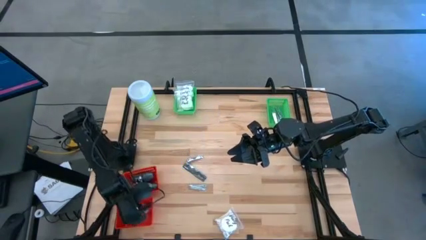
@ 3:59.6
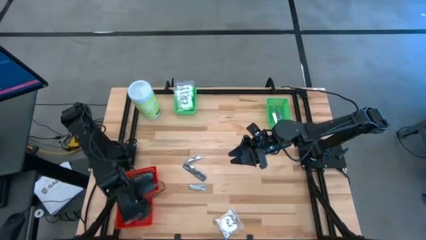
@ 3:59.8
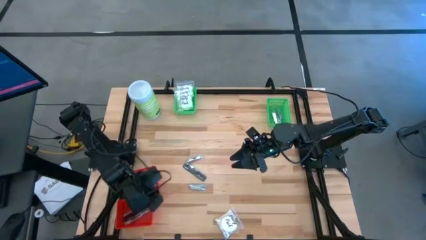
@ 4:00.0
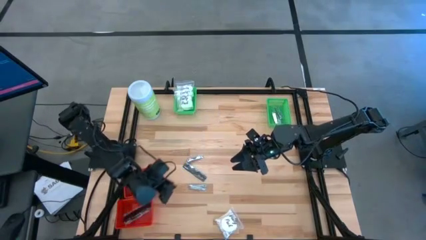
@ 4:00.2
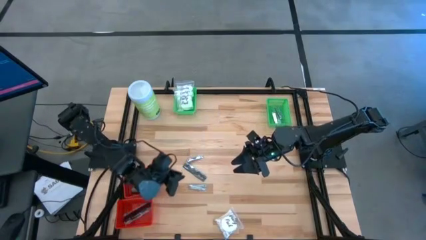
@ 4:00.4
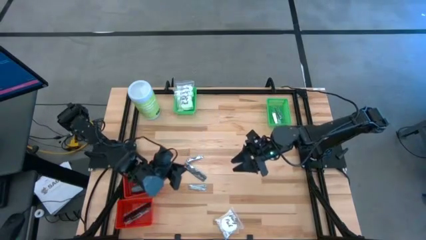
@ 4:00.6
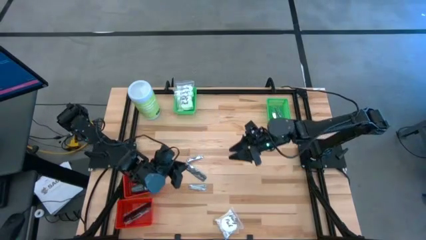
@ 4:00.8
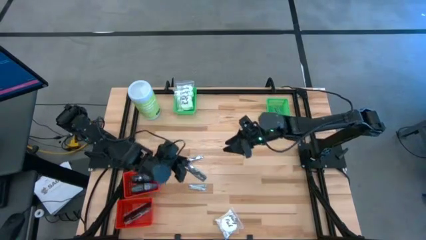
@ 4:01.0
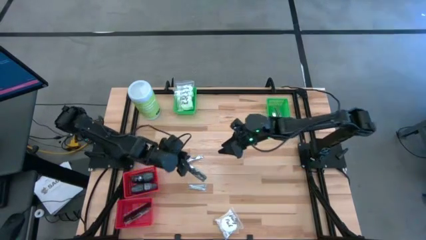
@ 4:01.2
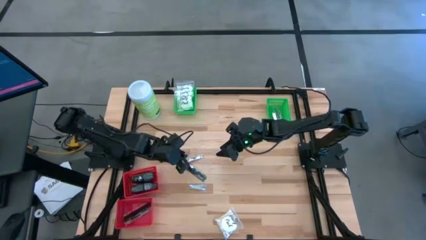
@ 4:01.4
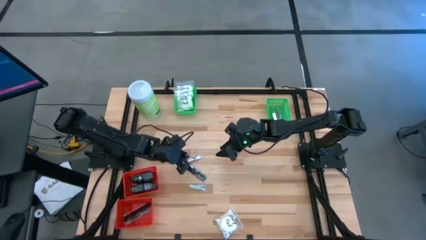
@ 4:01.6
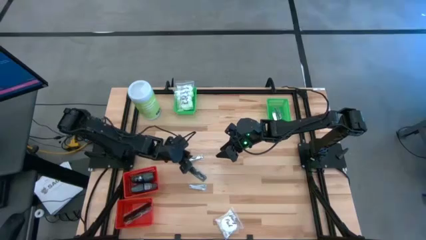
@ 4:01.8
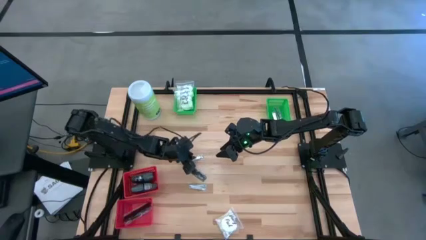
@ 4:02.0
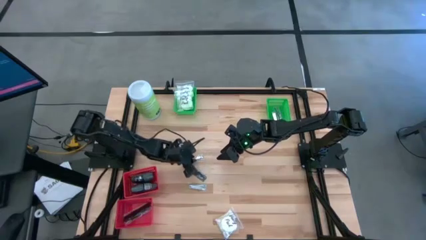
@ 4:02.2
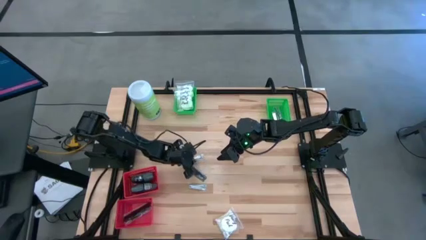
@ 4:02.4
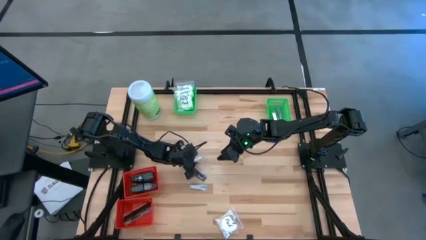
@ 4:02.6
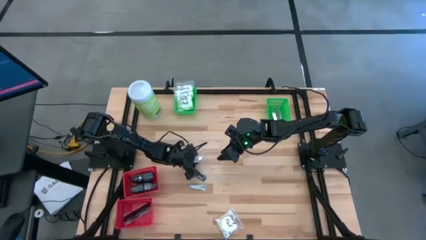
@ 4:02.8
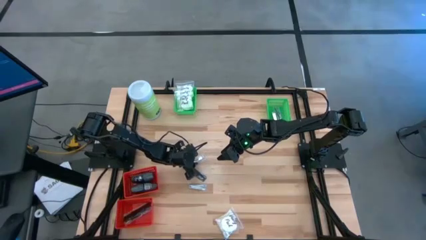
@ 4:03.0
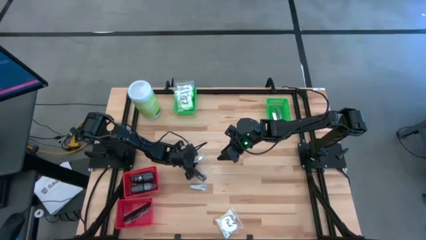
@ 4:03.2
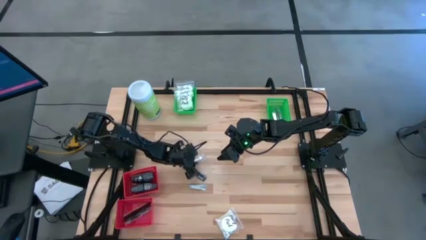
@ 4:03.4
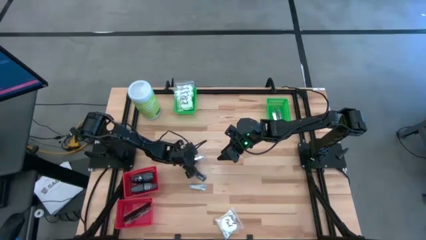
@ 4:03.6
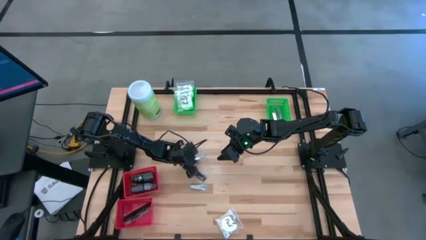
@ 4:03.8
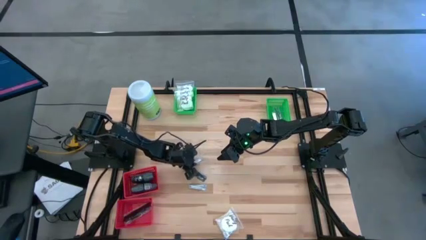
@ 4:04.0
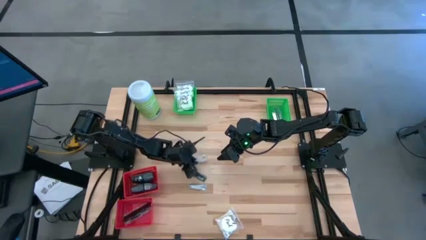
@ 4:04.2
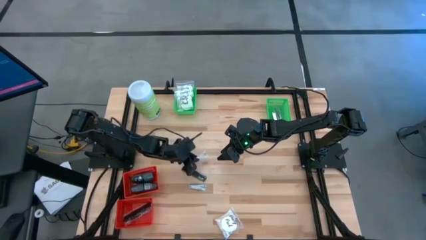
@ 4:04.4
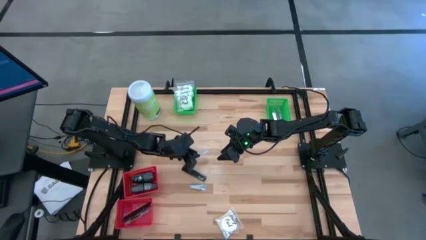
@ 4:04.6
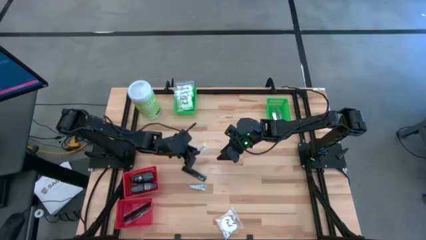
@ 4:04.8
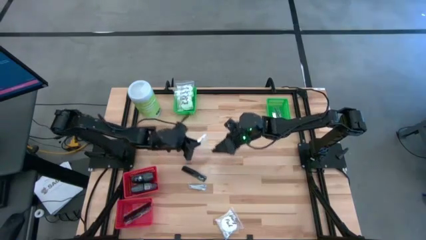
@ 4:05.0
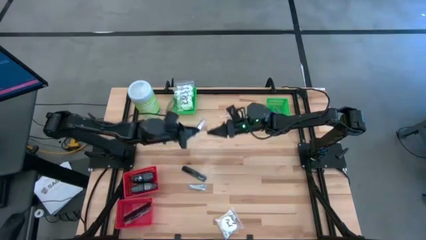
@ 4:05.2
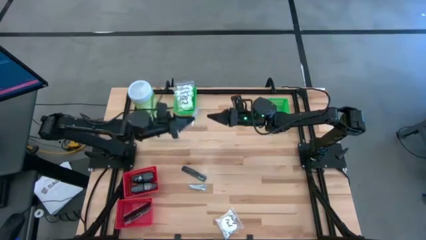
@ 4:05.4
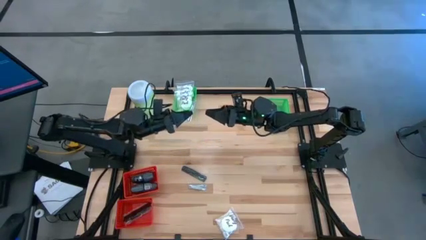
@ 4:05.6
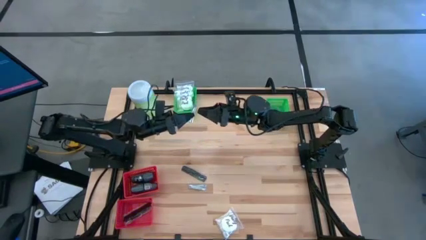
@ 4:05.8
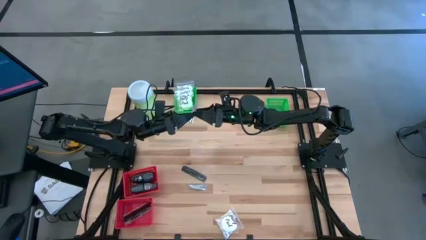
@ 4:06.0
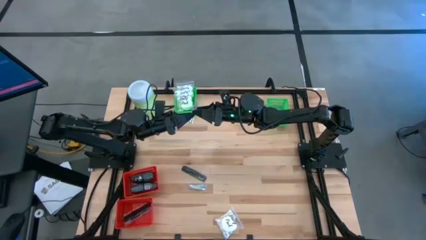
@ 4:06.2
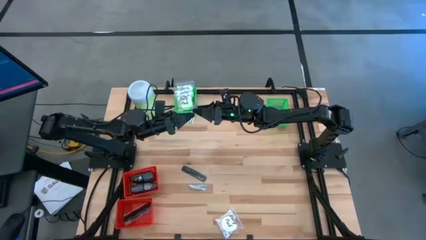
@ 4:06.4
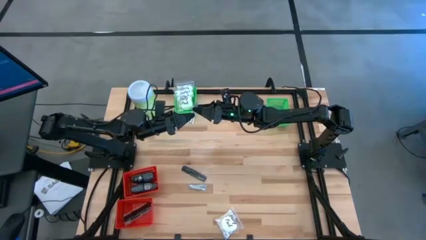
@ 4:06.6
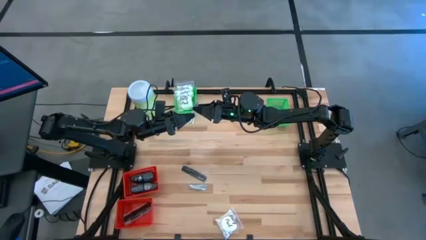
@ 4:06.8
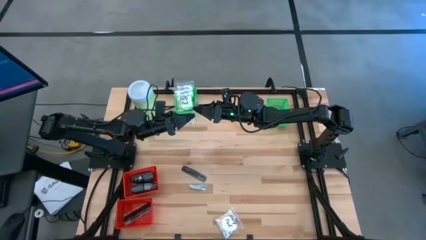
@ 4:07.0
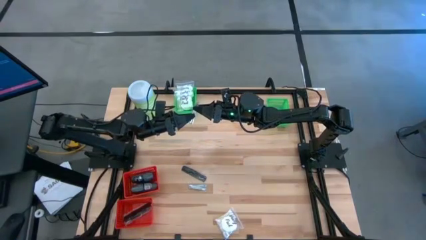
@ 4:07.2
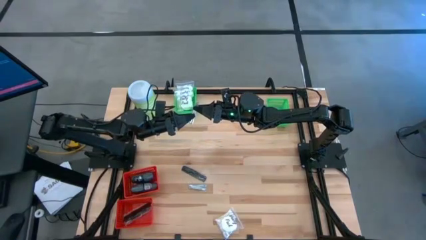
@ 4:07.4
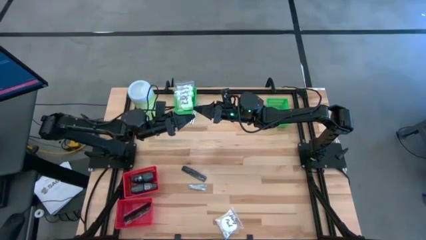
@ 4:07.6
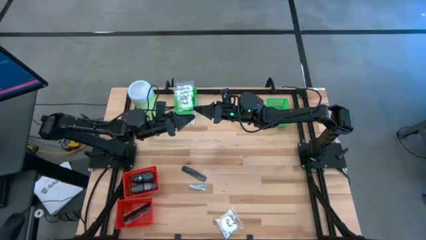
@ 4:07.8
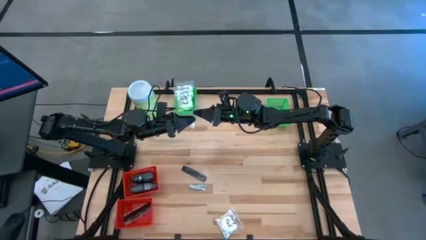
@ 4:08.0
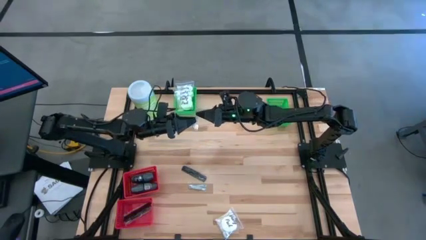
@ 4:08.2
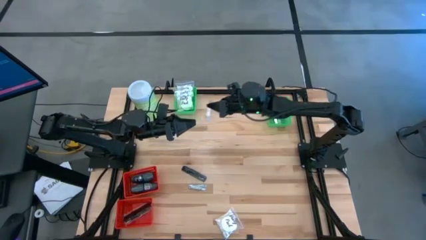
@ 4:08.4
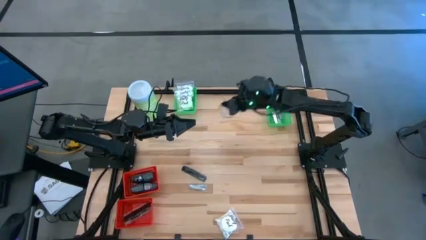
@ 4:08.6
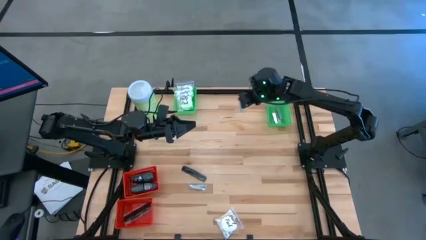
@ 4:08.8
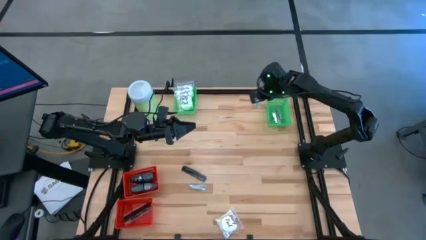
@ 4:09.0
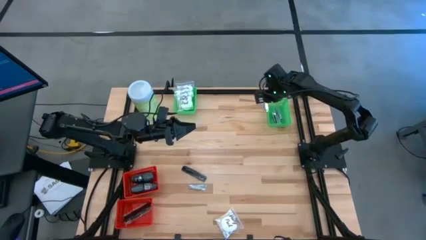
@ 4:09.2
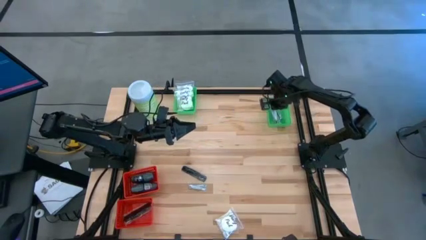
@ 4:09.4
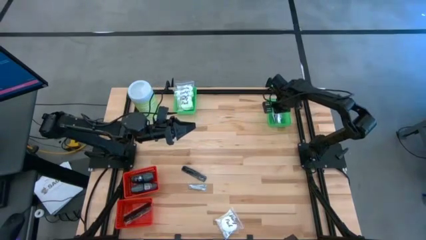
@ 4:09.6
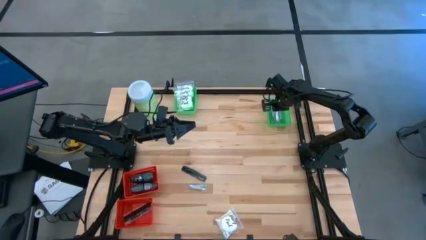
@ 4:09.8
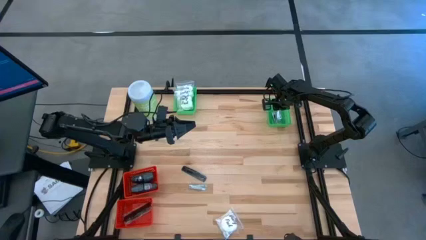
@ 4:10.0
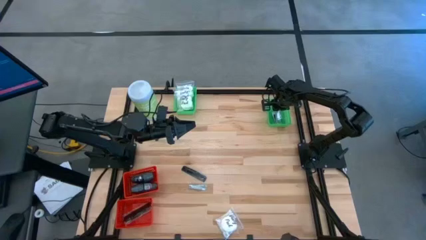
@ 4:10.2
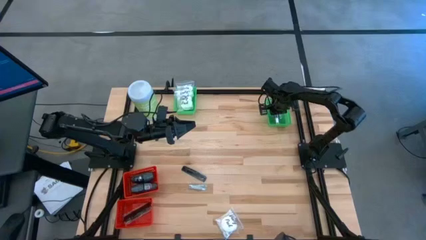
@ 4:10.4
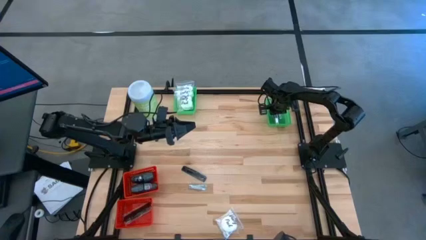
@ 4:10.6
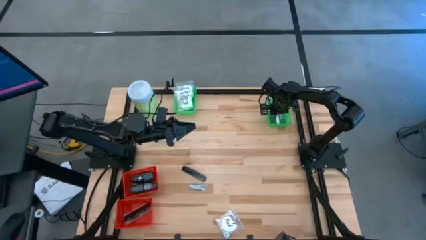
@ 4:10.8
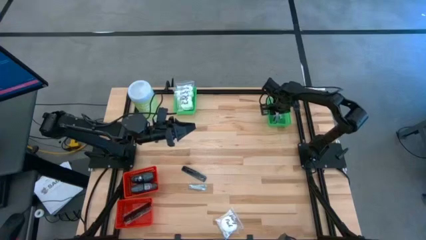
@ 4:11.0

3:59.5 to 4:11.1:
Task: Pick & Place Travel size toiletries
Put the silver nail cutter into the top right green basket

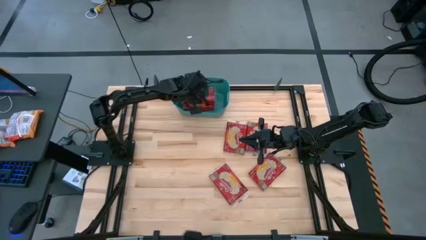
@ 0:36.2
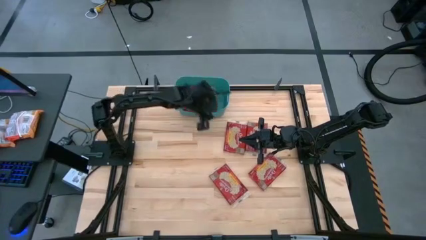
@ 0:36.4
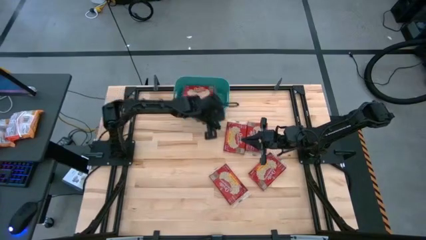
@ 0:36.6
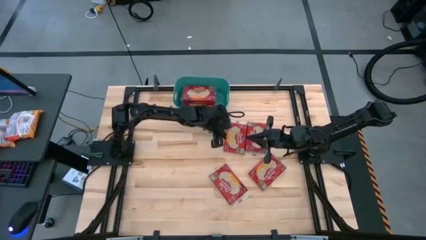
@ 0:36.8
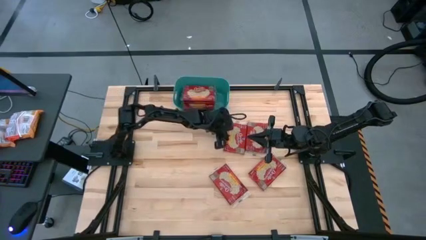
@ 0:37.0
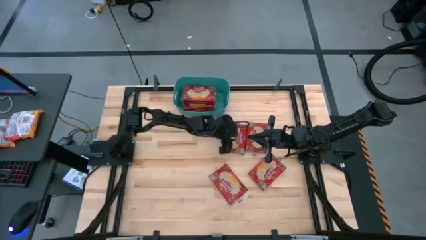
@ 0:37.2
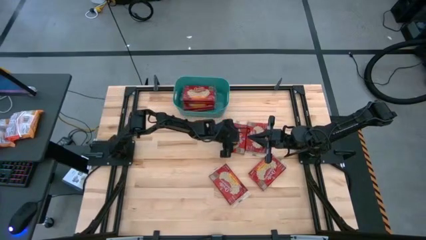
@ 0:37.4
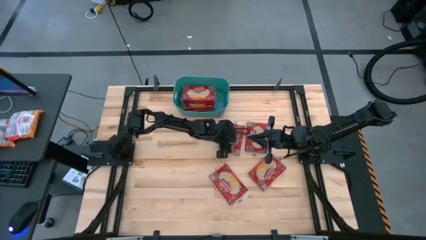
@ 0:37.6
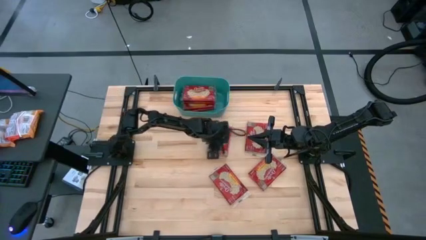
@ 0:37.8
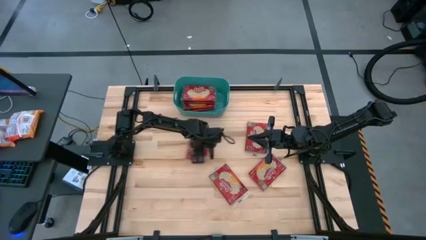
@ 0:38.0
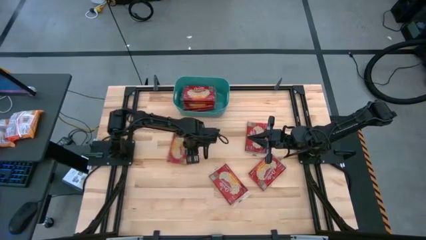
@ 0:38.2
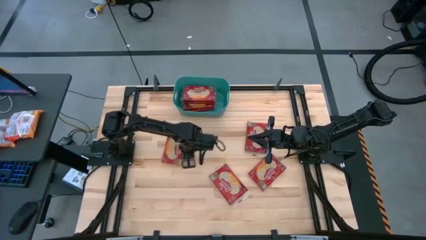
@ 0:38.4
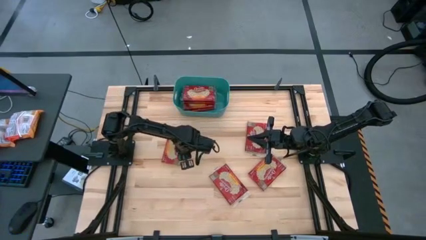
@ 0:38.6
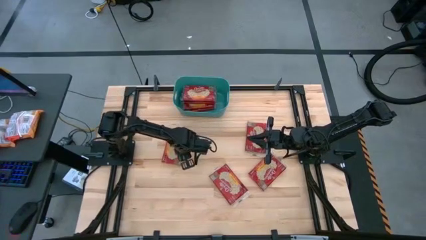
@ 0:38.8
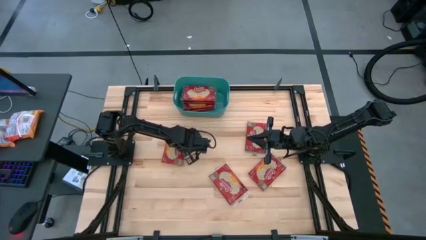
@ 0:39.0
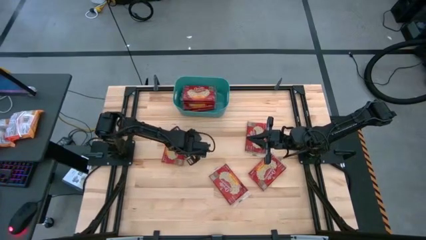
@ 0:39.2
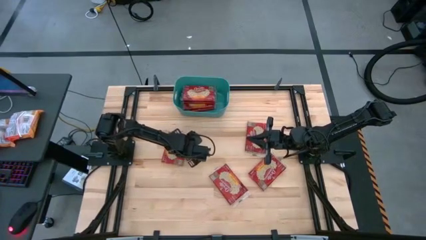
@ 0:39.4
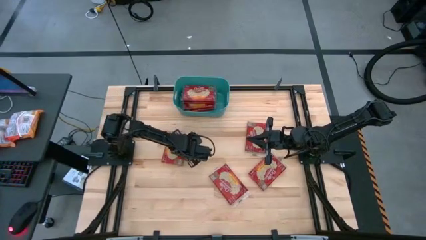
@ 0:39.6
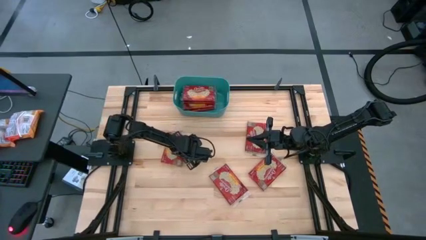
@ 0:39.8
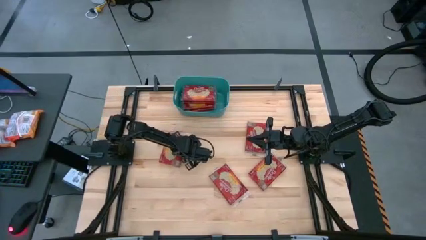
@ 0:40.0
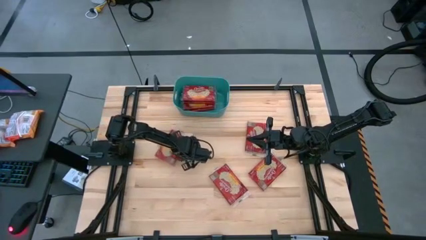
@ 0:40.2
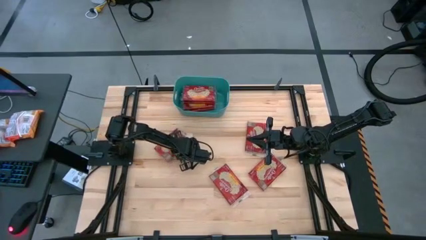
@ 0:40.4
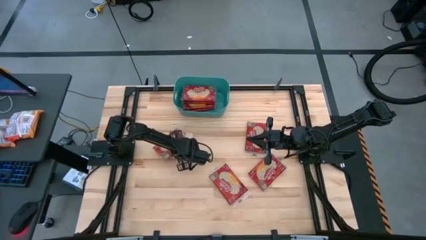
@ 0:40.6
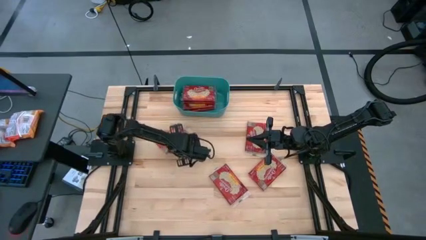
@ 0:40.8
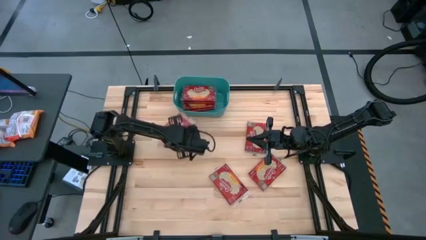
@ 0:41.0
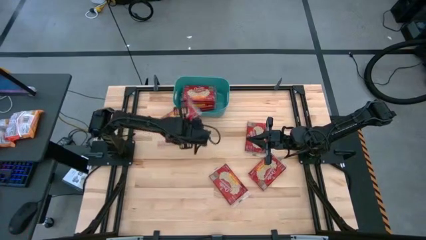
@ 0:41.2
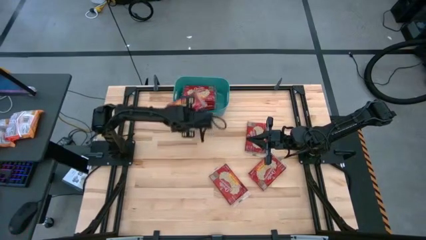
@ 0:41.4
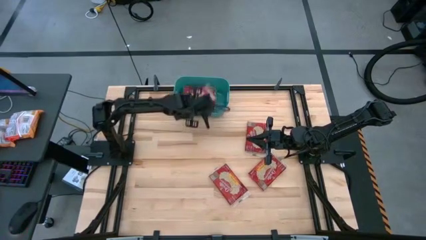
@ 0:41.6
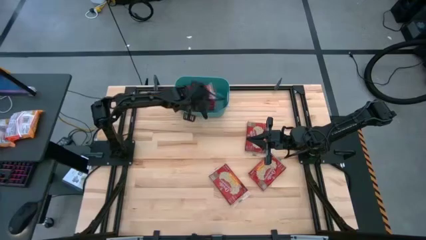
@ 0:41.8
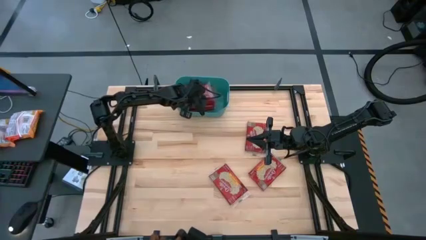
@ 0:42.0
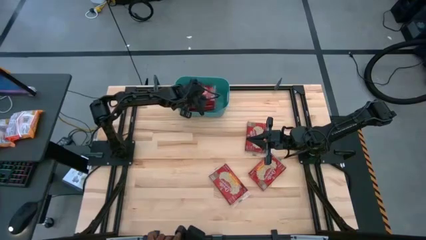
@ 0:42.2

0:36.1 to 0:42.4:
Task: Sort popcorn bags into baskets
Put the popcorn bag into the green bin
